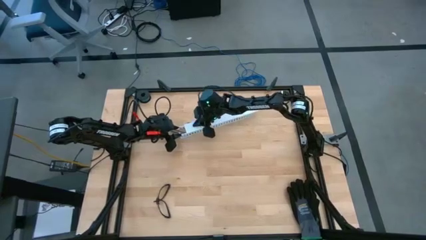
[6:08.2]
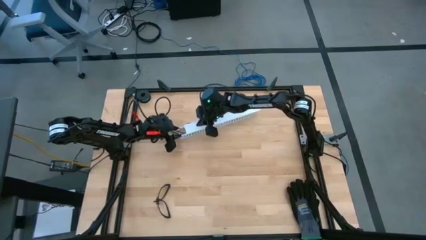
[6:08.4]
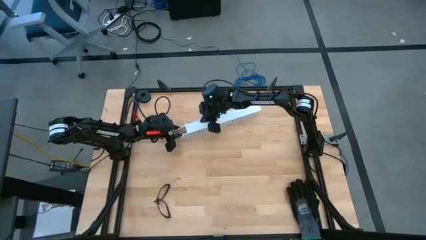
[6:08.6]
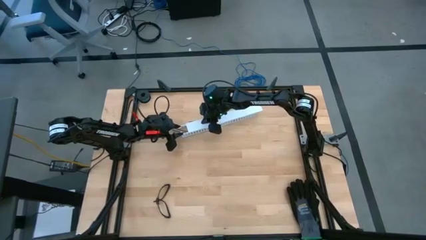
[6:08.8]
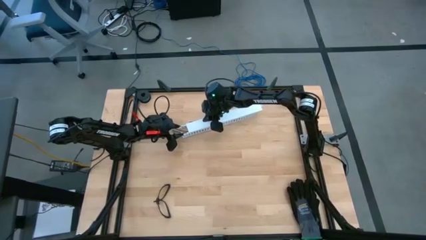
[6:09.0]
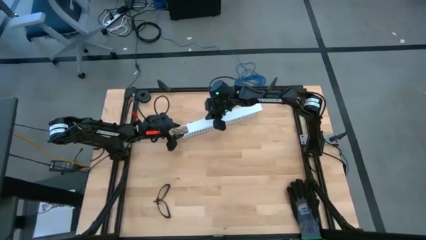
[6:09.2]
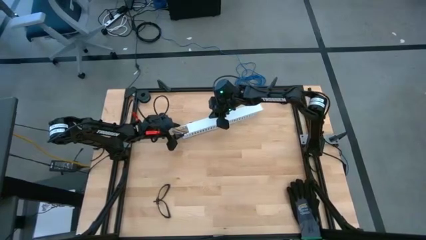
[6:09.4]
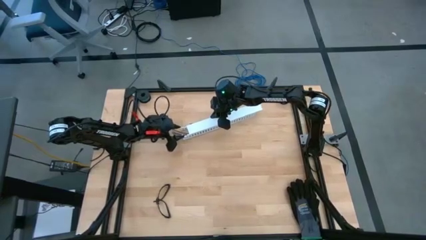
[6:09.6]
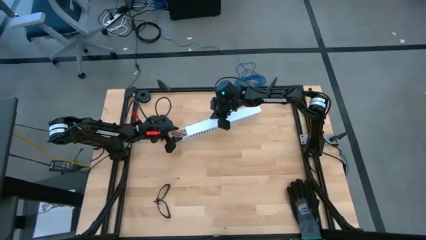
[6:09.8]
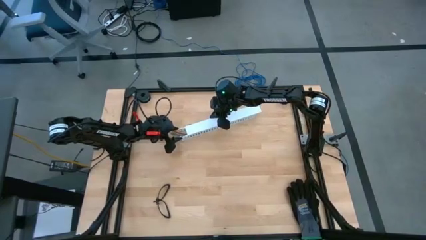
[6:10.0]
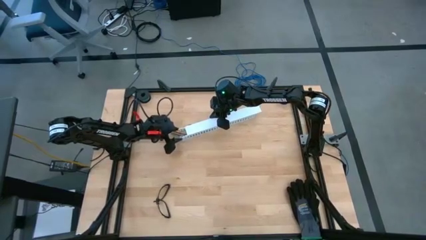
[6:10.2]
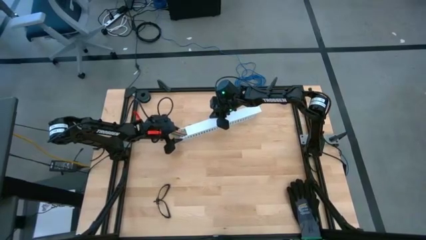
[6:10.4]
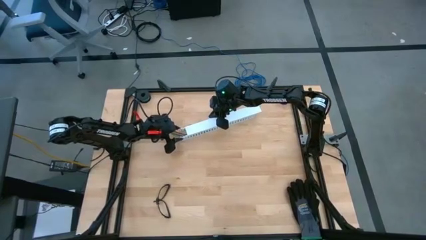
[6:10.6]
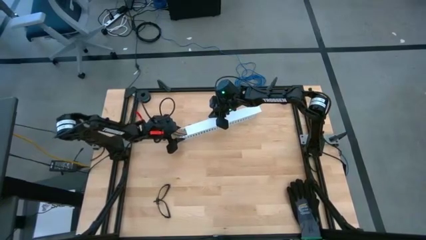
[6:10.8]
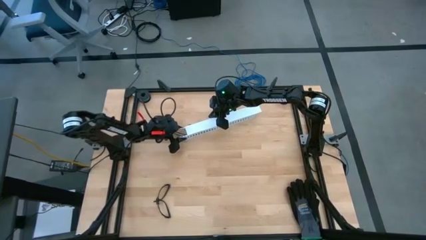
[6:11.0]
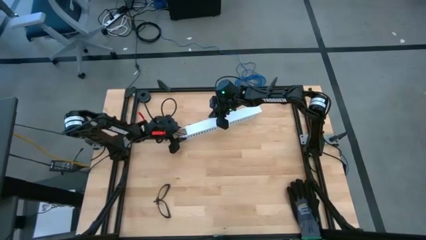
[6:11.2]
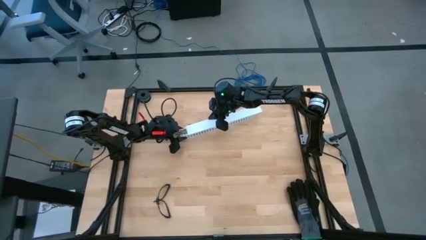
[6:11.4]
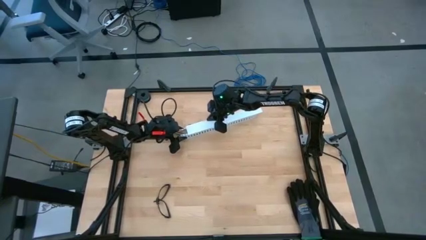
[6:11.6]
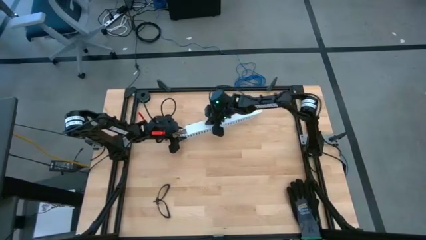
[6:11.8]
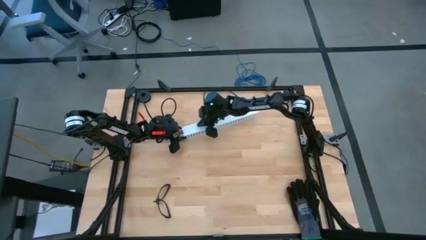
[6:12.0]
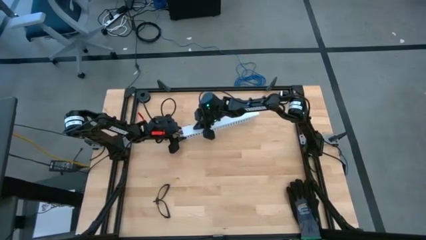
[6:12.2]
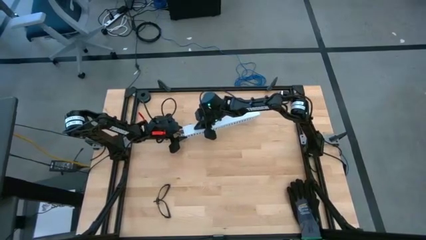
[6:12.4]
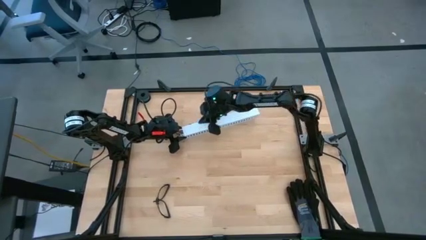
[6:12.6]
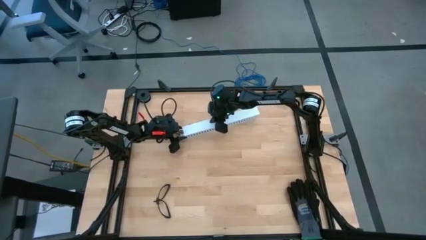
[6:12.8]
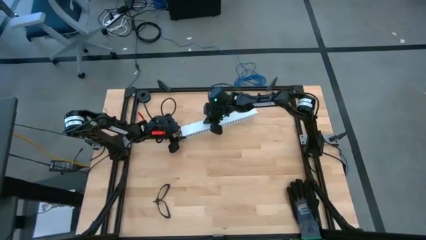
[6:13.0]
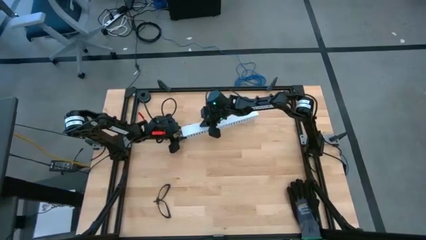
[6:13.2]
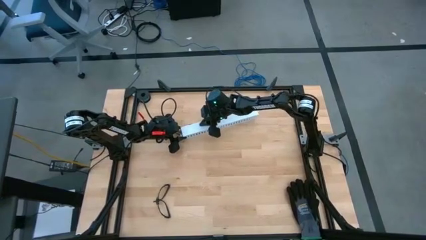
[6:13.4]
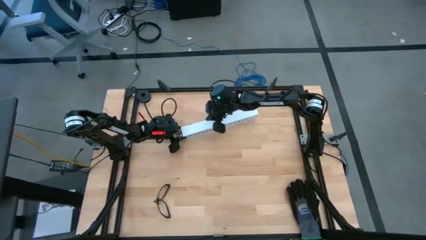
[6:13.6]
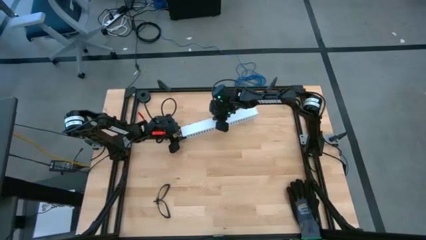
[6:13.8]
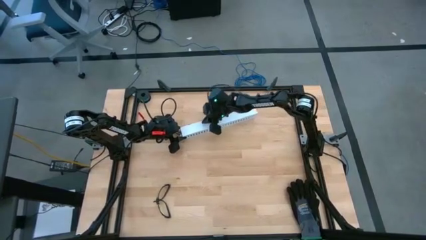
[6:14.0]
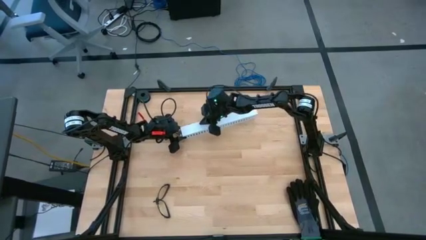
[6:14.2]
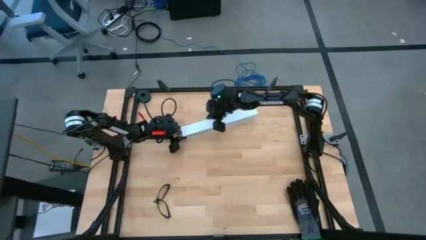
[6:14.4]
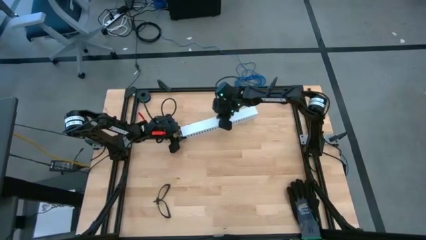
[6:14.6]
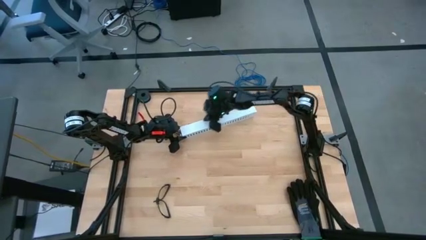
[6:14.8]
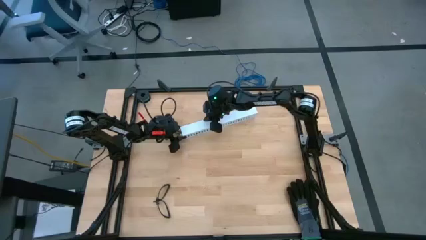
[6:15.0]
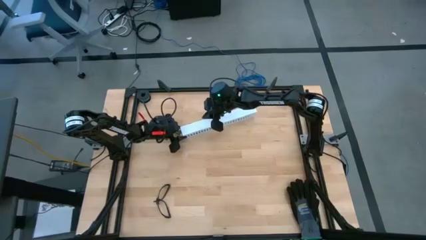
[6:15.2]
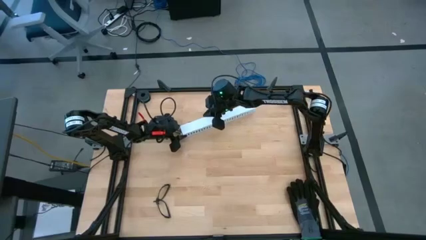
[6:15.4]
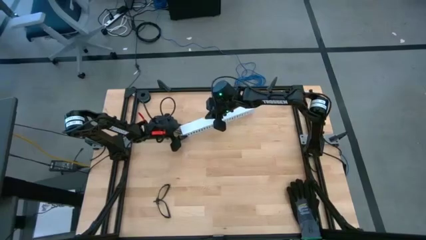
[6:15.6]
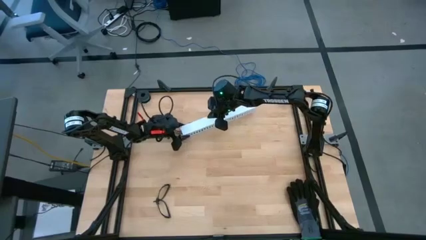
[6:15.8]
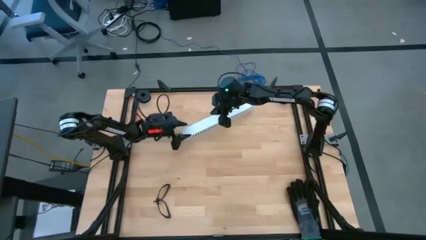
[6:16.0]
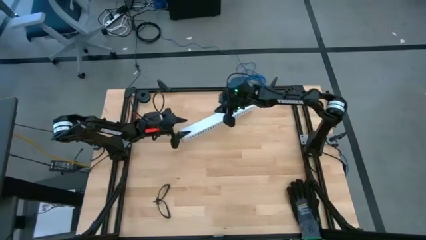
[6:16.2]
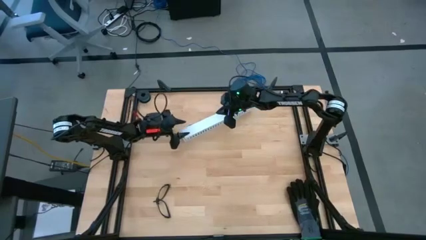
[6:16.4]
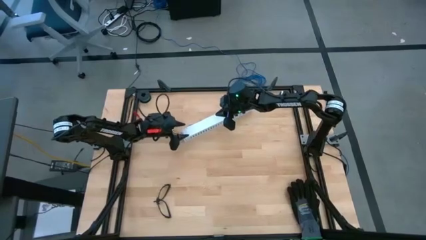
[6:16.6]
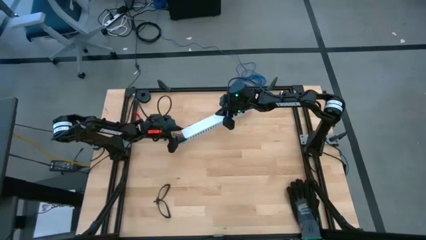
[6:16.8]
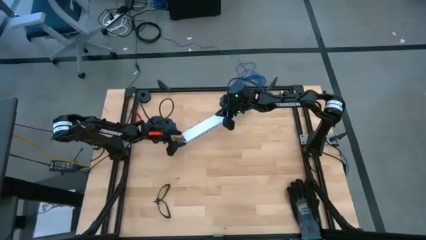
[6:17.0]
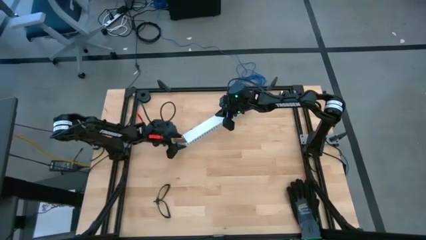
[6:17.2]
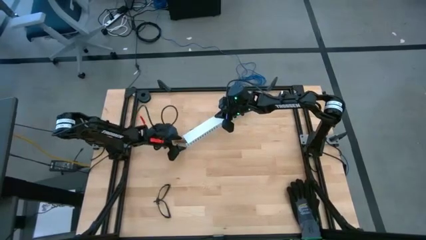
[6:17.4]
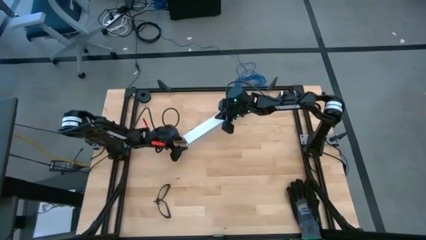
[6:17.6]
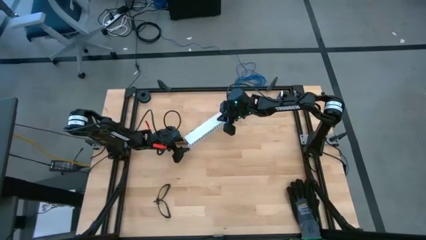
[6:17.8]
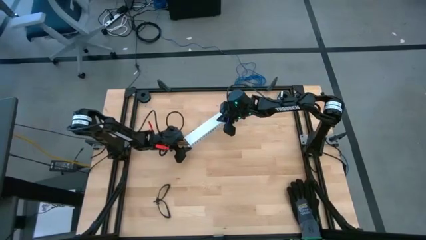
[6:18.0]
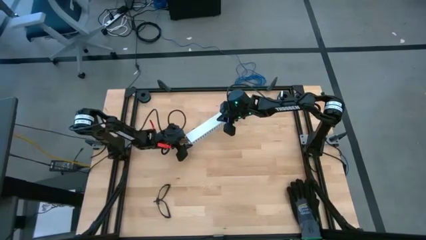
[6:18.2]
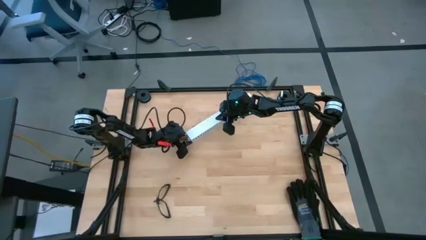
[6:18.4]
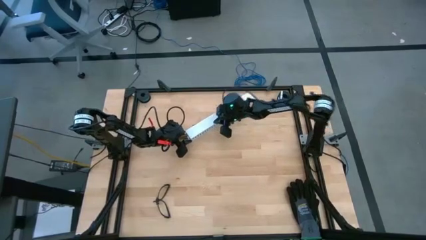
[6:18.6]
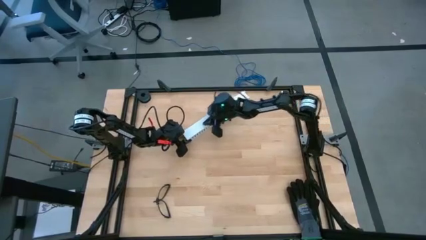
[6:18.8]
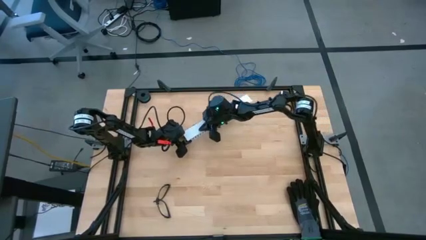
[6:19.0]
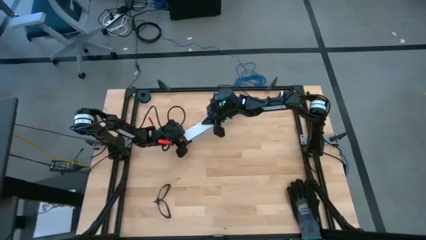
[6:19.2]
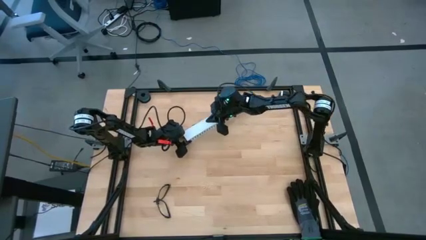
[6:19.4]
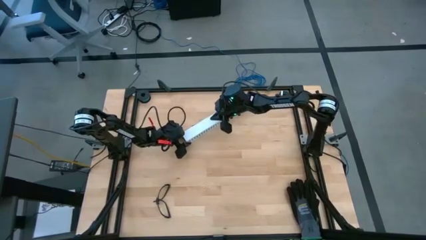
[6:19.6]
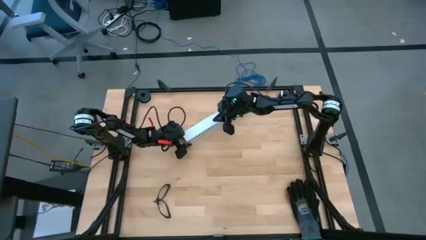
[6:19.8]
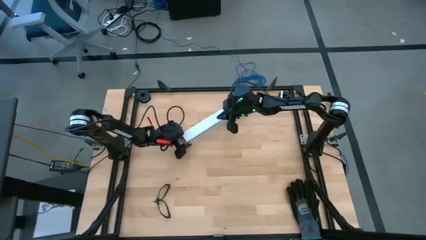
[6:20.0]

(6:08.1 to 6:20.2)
Task: Ziptie cables
Close the white cable duct lid
